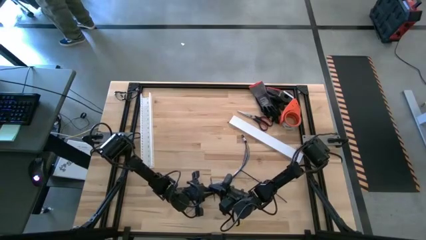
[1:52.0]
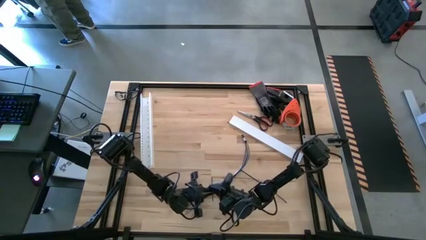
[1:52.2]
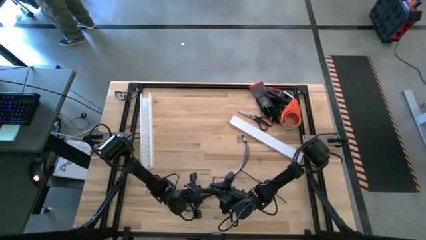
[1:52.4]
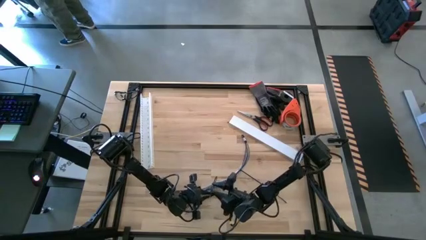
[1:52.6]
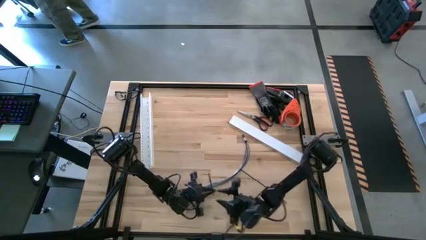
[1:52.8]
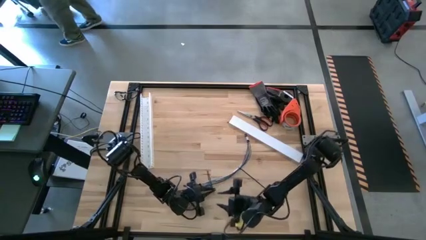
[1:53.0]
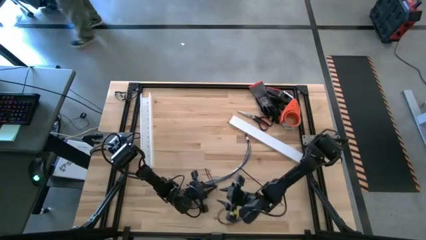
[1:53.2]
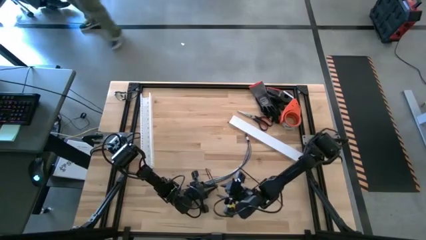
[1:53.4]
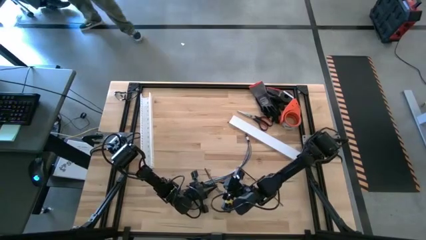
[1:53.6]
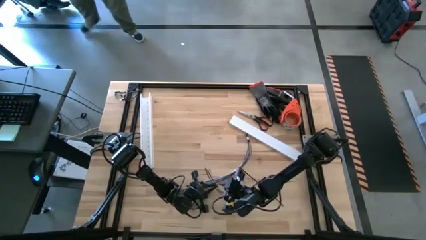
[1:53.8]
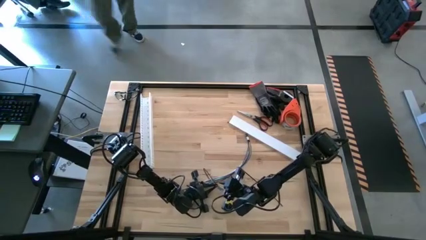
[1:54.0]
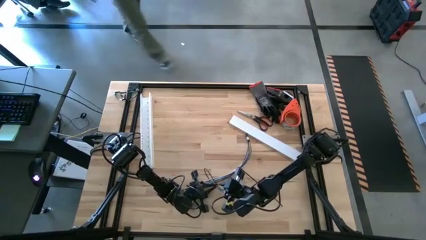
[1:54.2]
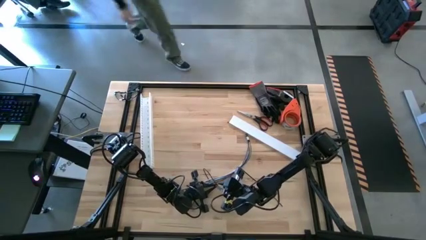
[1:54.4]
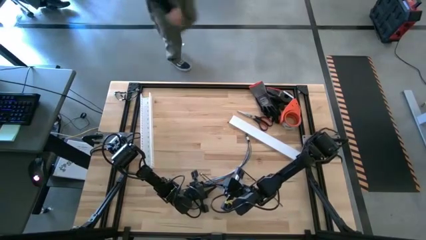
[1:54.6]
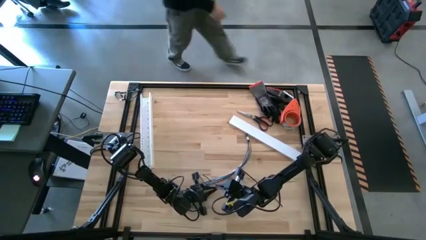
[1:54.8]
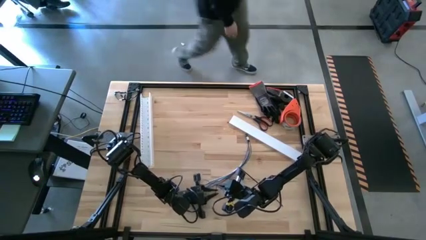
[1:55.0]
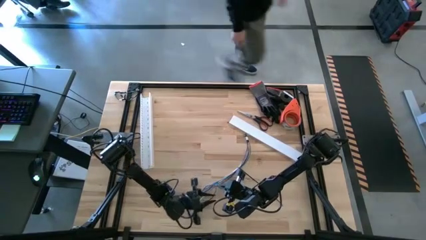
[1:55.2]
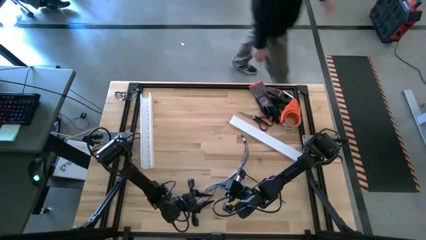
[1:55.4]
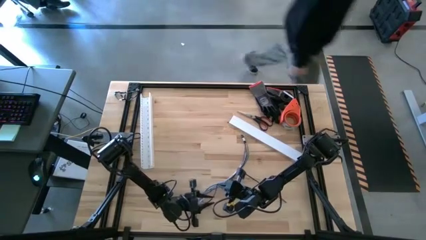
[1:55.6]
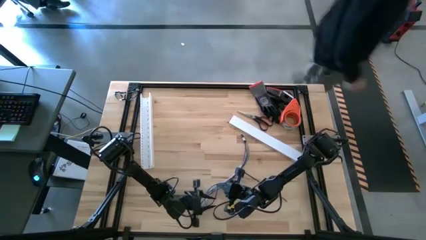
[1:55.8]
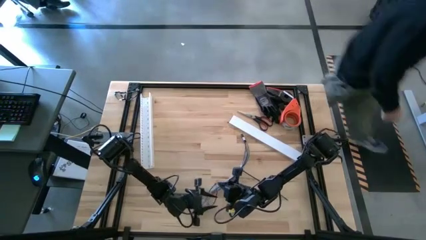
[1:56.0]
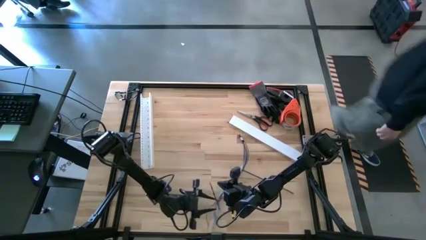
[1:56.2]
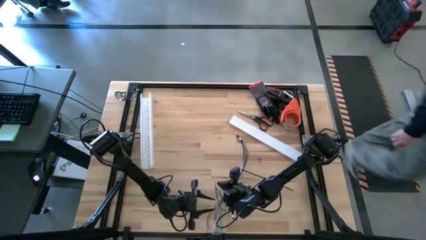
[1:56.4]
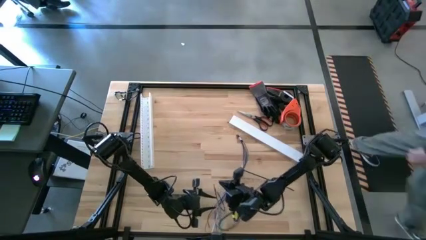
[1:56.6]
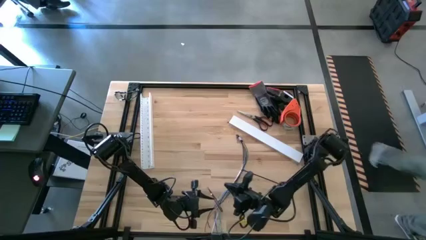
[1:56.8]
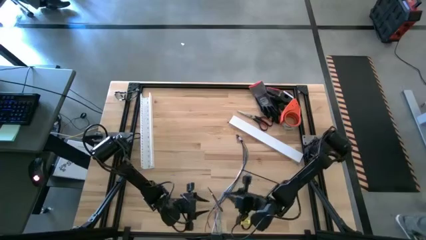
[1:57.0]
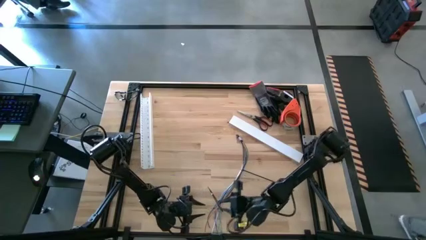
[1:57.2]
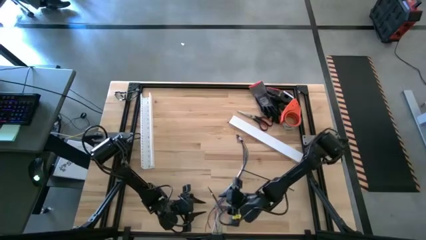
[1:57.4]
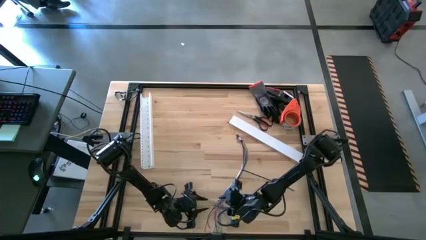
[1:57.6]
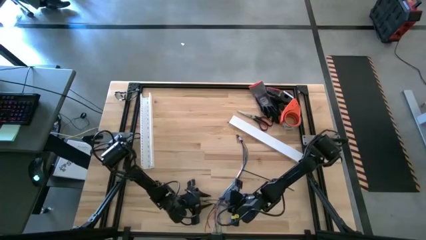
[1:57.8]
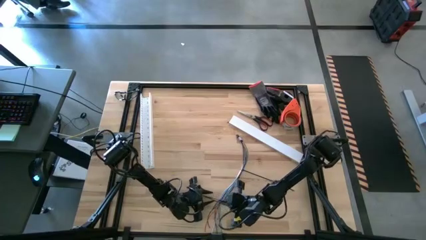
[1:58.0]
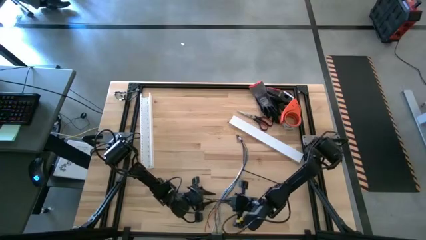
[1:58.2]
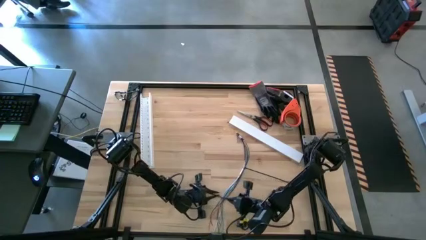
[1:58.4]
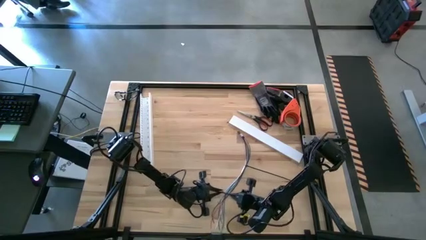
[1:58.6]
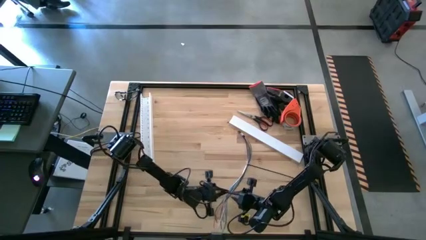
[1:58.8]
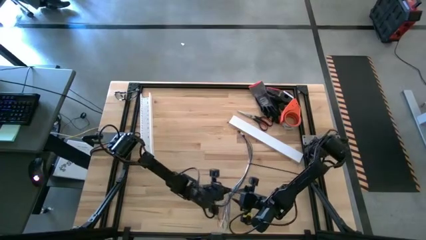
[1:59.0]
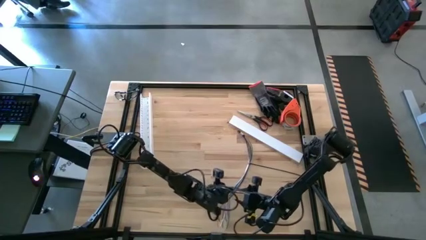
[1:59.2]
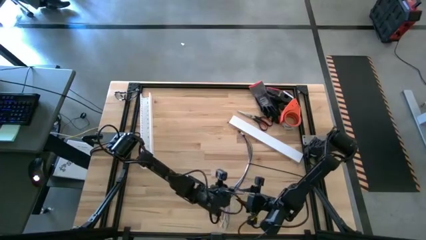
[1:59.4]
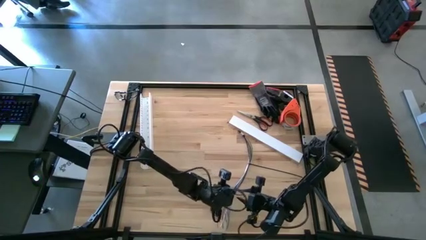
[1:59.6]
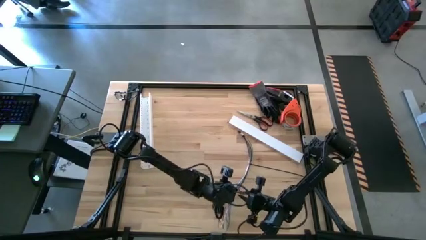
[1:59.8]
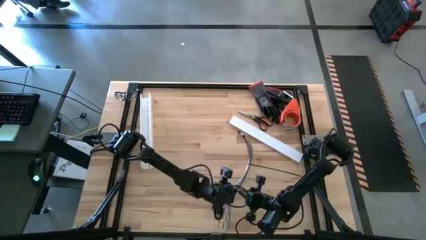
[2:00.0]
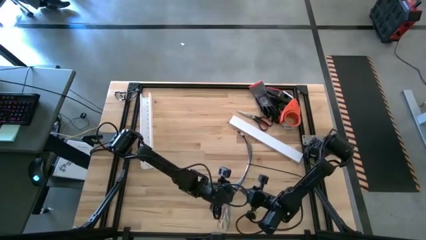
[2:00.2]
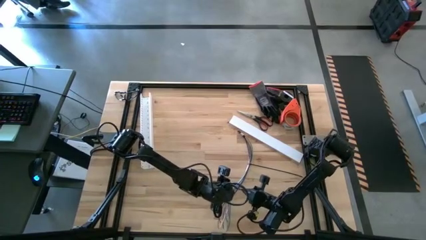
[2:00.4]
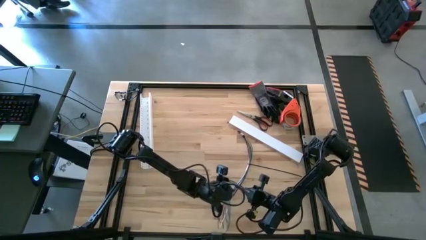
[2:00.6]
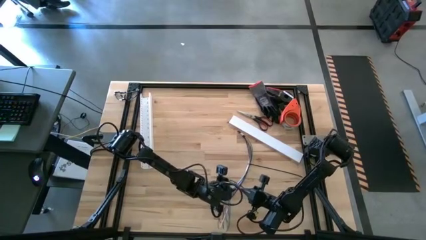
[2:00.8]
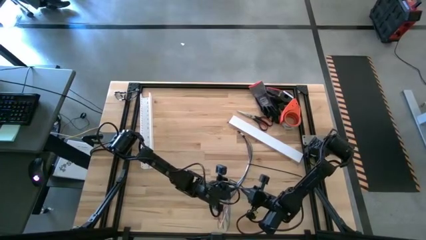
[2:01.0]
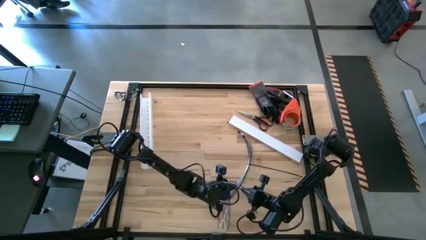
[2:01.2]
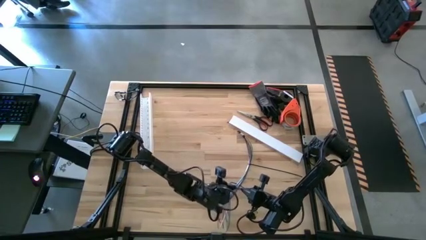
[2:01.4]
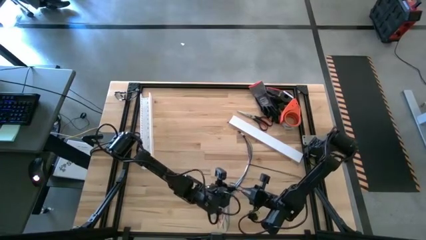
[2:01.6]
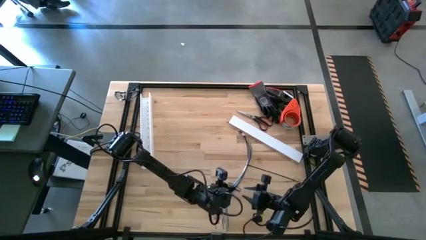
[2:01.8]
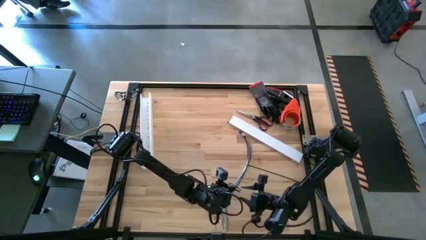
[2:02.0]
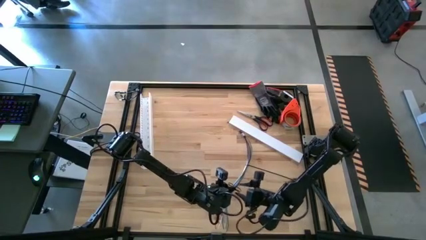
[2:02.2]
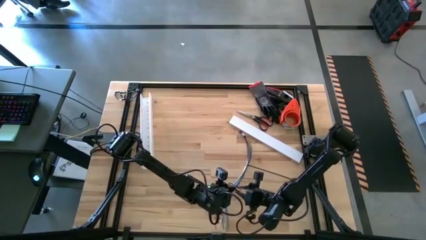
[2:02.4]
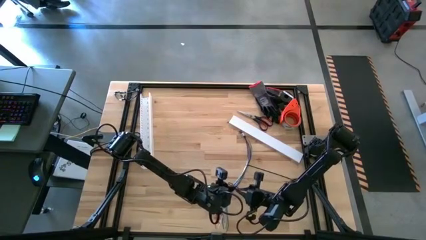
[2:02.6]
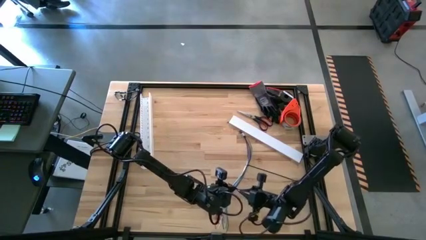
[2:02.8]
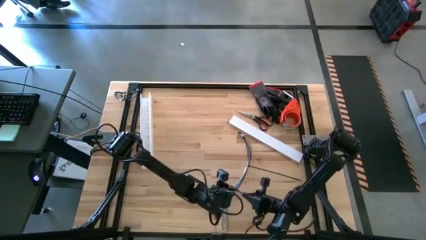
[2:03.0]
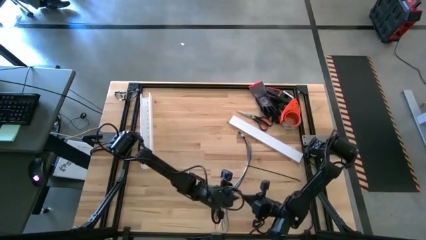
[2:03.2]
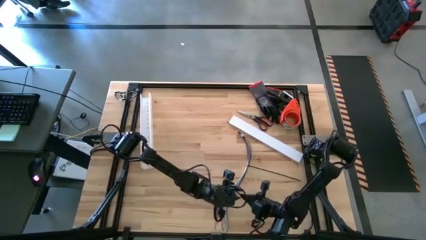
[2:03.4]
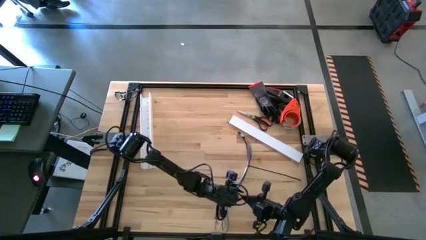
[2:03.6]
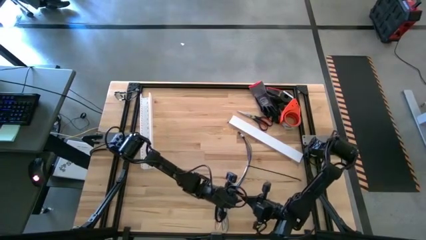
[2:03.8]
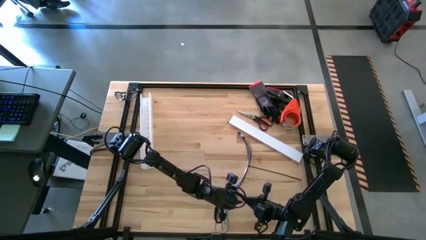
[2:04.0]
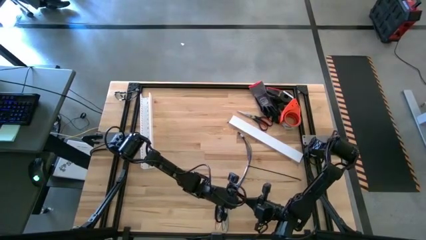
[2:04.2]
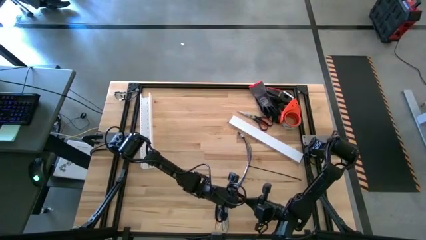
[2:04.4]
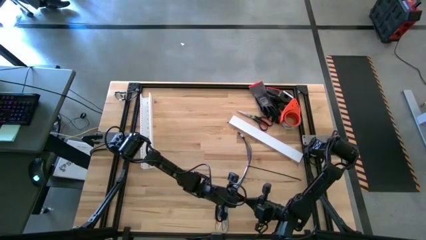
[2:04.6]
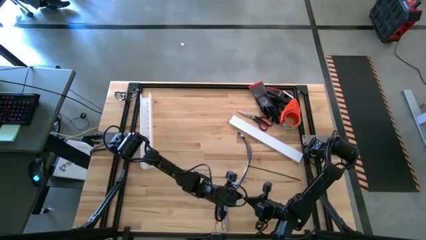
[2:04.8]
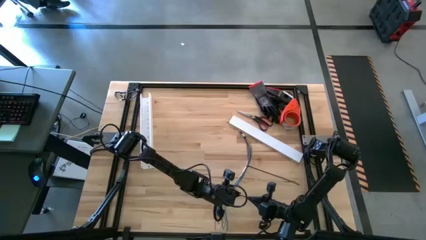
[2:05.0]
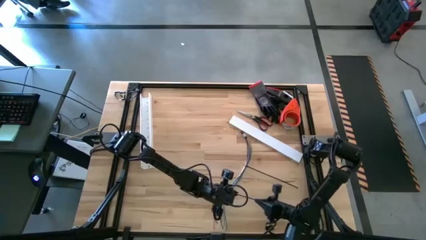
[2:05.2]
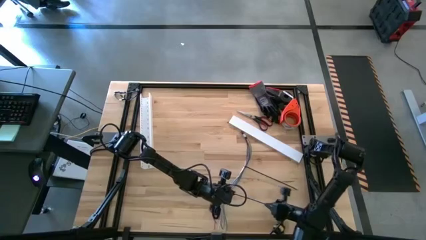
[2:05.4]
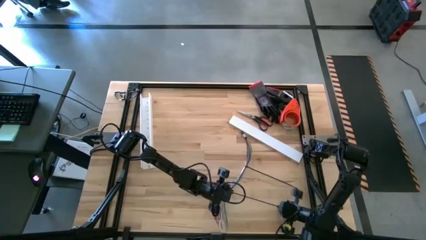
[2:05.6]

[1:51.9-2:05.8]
Task: Ziptie cables
Wrap the zip tie on the cable
